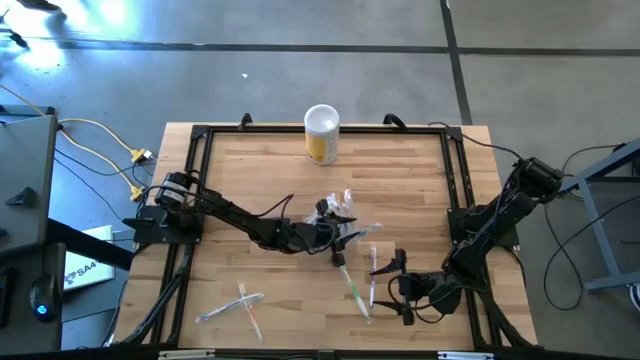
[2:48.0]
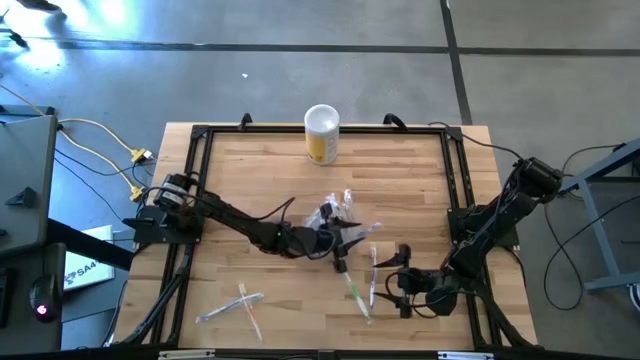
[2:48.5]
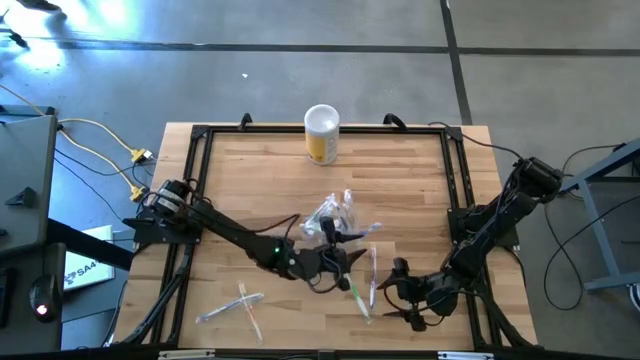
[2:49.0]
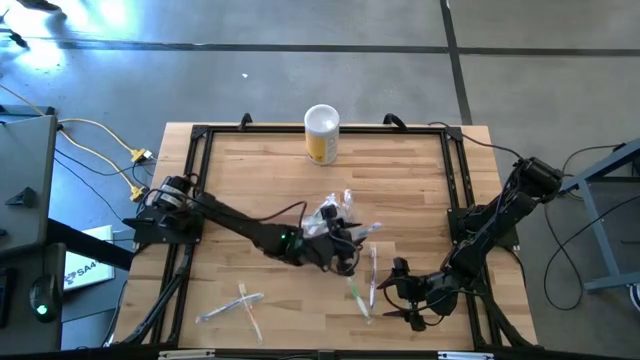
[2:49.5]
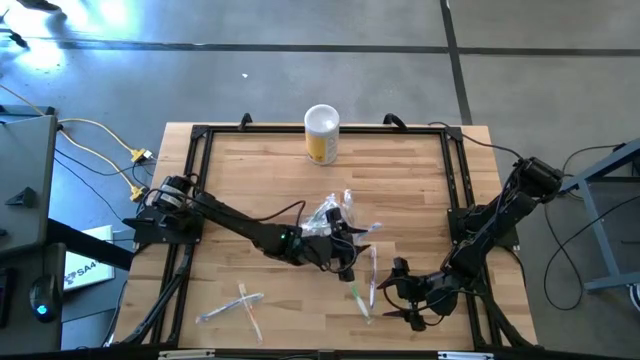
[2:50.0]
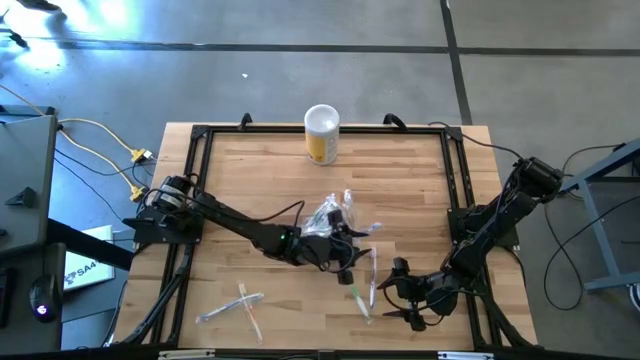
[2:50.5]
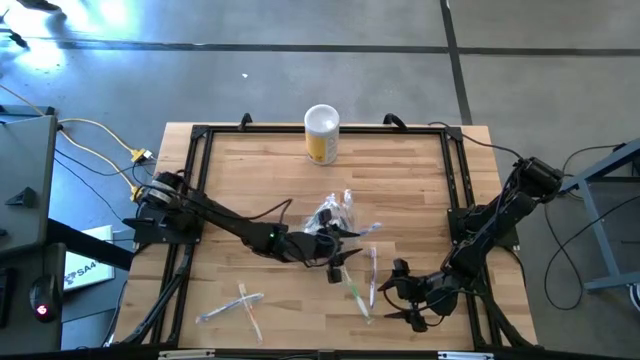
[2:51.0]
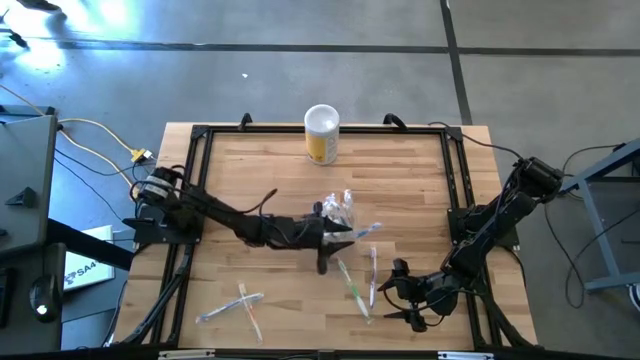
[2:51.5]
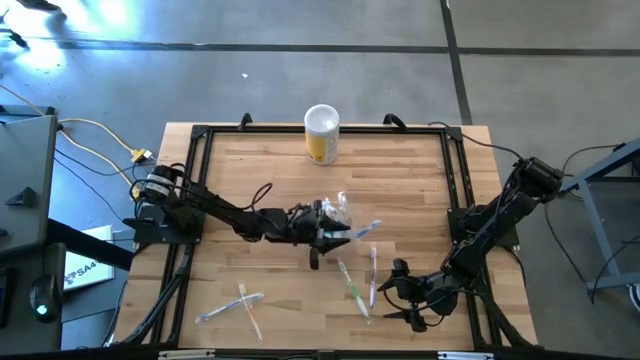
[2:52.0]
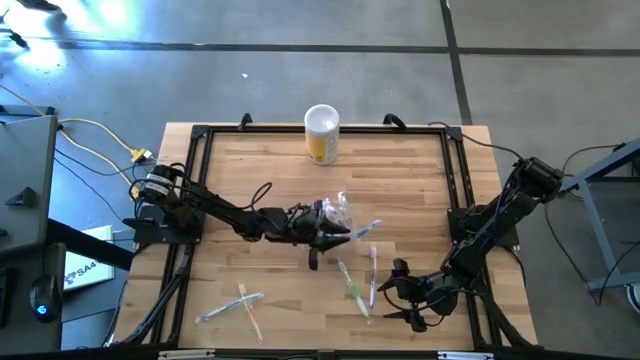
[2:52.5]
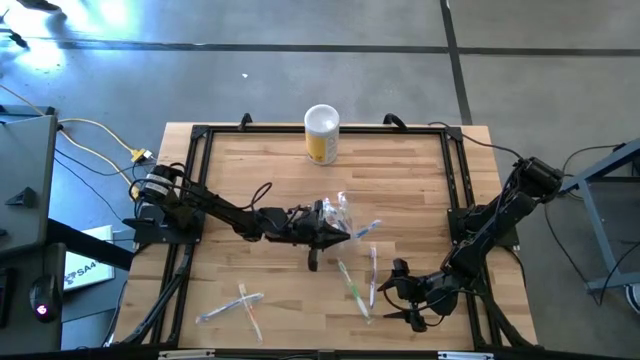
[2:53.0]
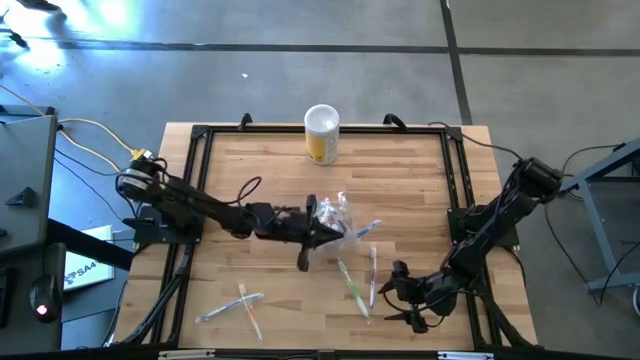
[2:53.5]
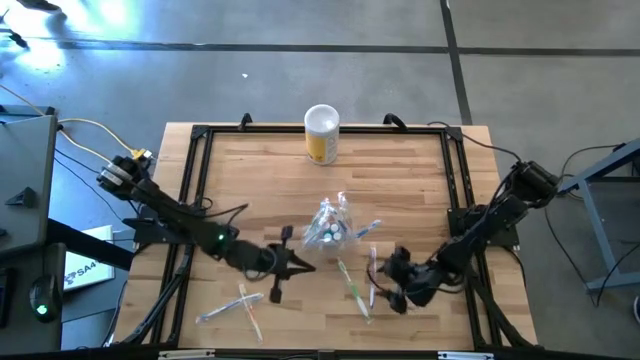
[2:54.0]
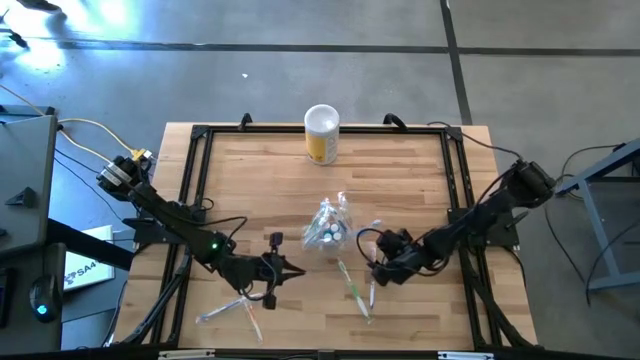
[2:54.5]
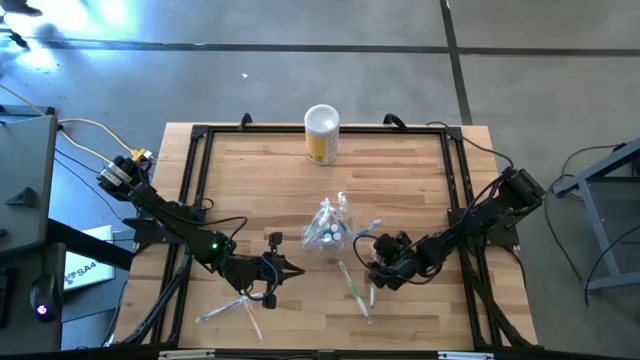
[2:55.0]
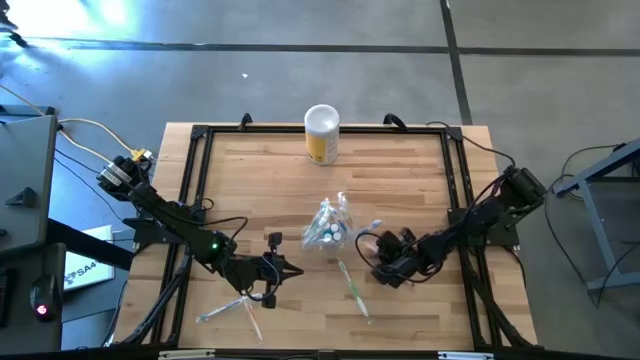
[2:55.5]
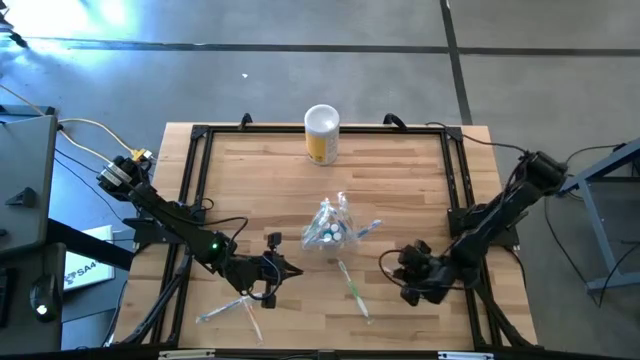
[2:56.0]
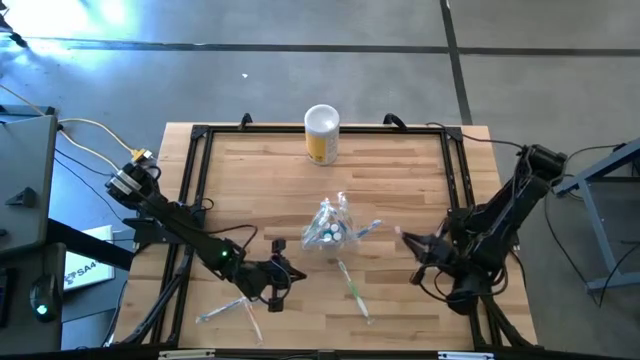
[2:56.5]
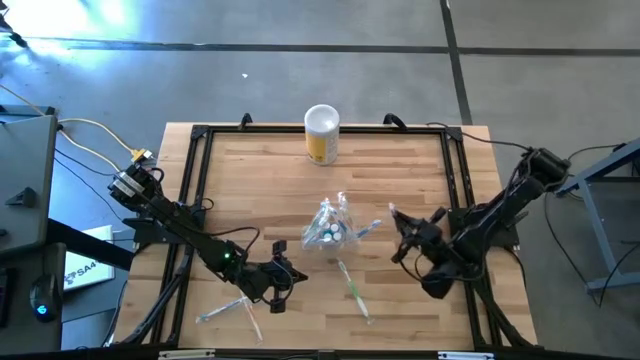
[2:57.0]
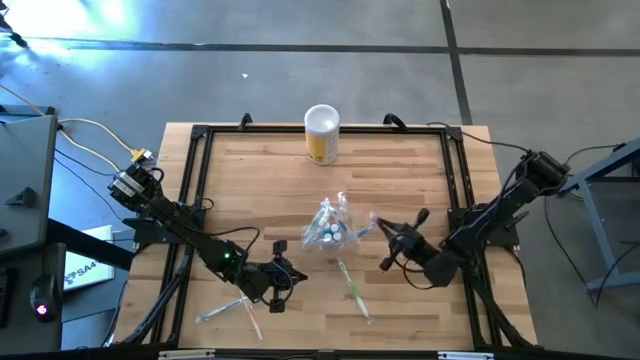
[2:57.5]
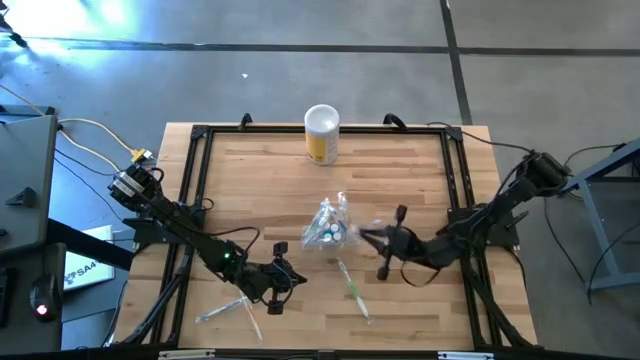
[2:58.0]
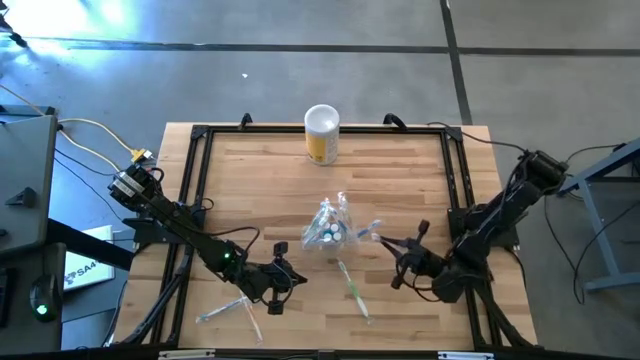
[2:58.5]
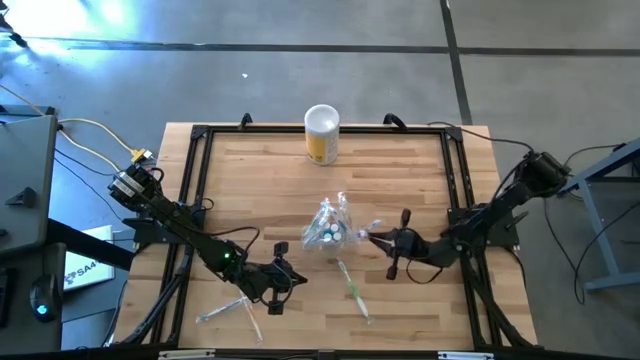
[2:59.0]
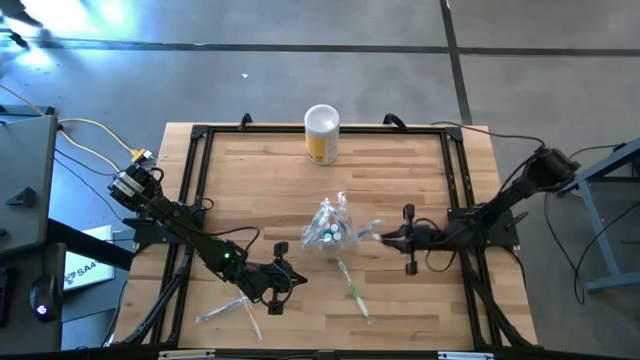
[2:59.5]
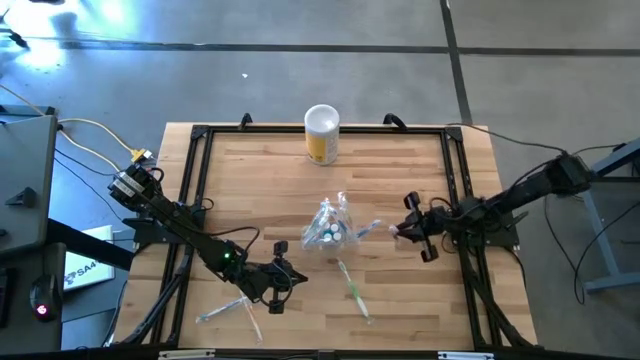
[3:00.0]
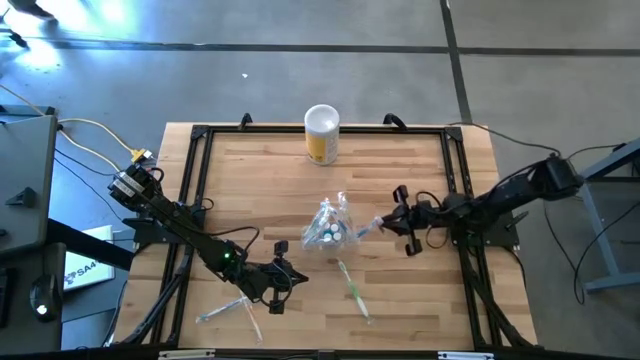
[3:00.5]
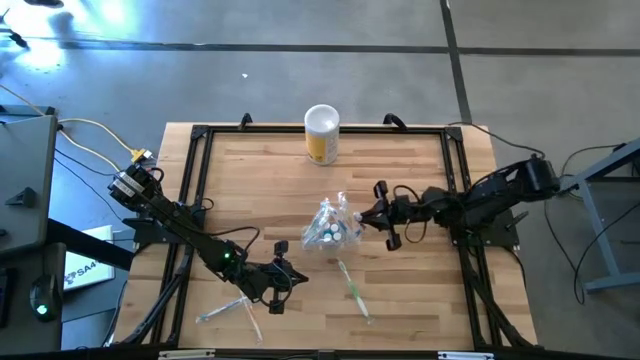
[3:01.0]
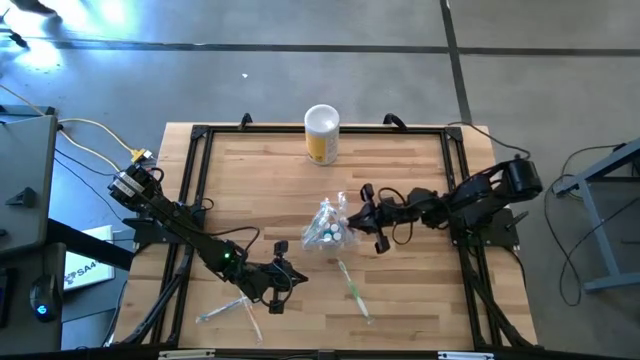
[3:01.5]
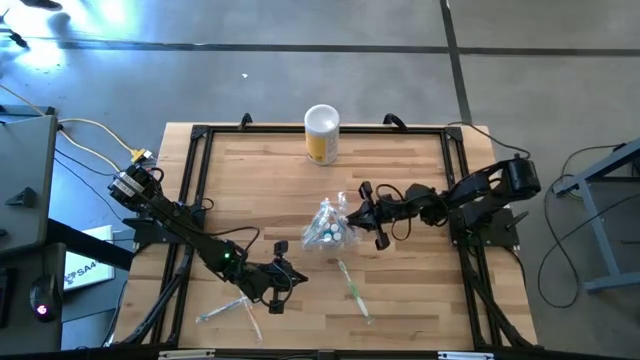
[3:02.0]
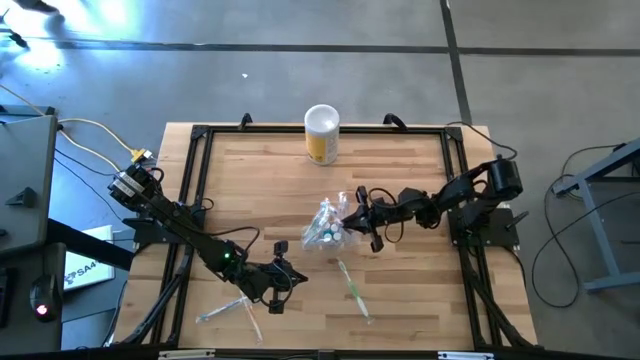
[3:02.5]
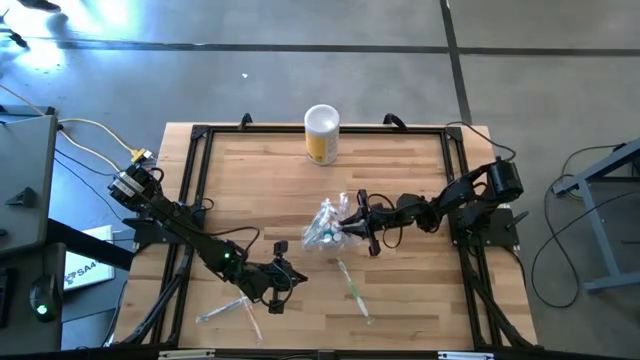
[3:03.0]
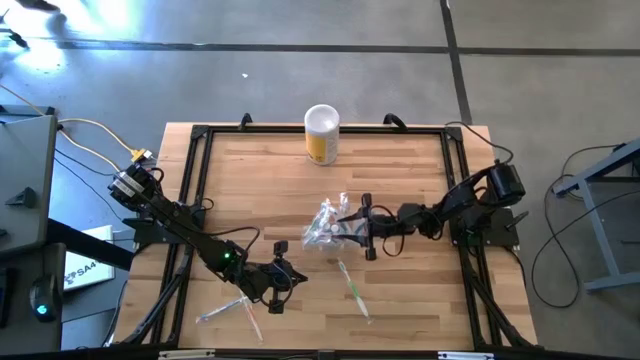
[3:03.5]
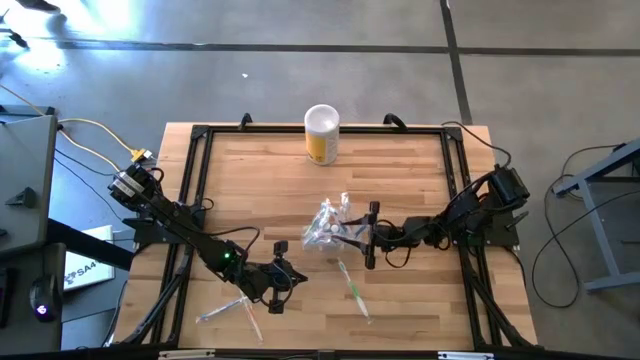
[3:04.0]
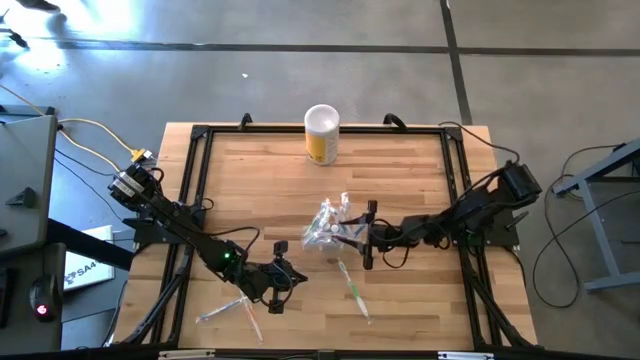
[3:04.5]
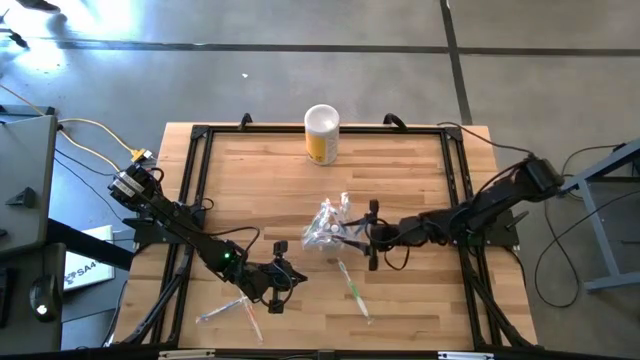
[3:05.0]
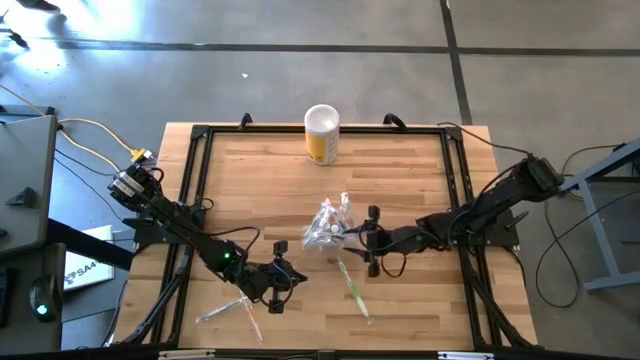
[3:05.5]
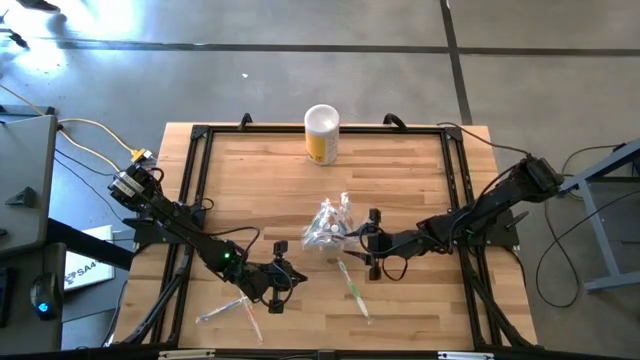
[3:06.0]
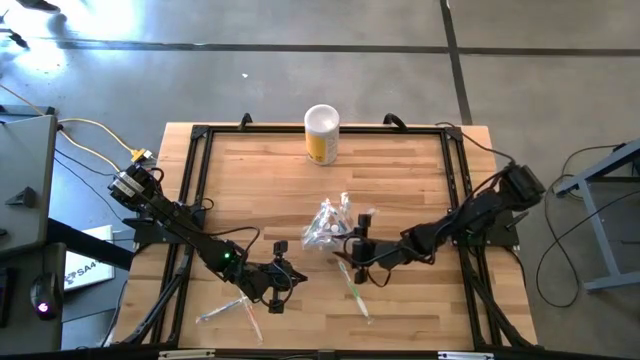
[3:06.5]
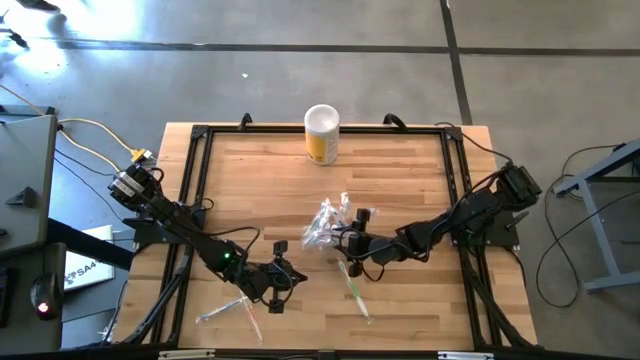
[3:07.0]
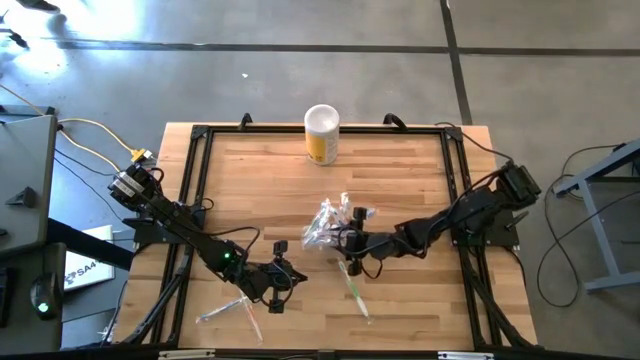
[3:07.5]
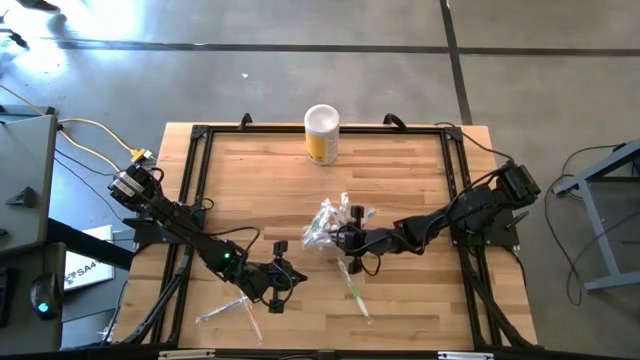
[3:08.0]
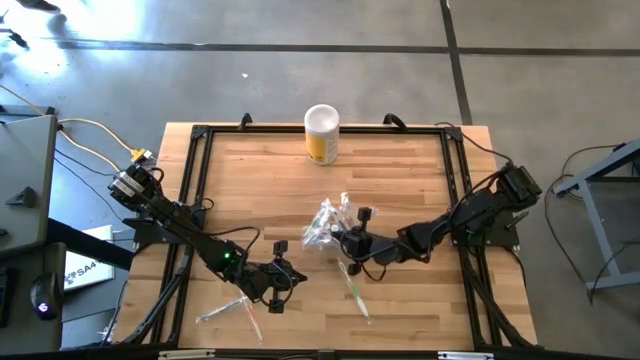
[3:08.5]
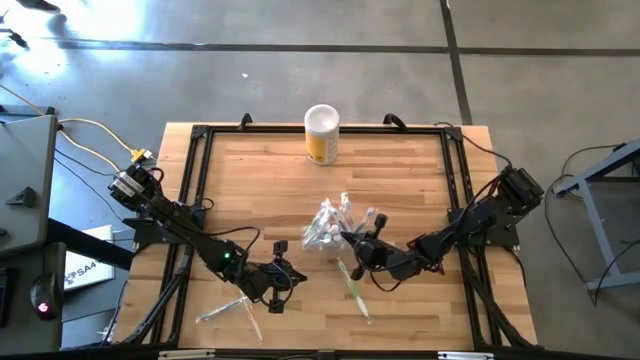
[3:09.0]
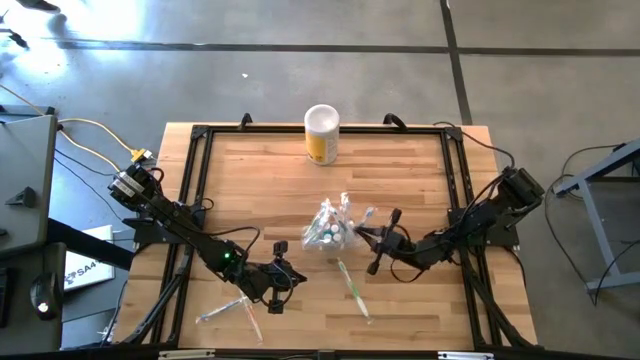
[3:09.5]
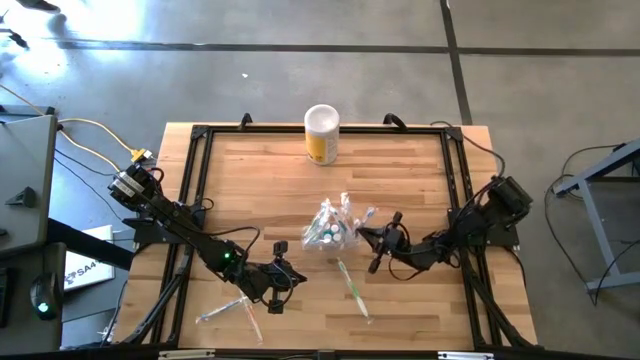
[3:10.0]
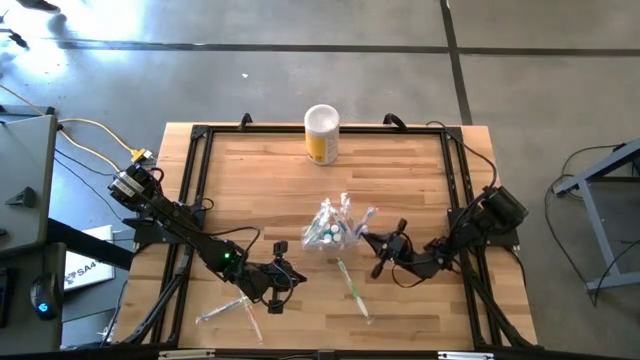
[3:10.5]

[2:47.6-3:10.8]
Task: Pick & Place toothbrushing station
Put the purple toothbrush into the right part of the transparent organizer
